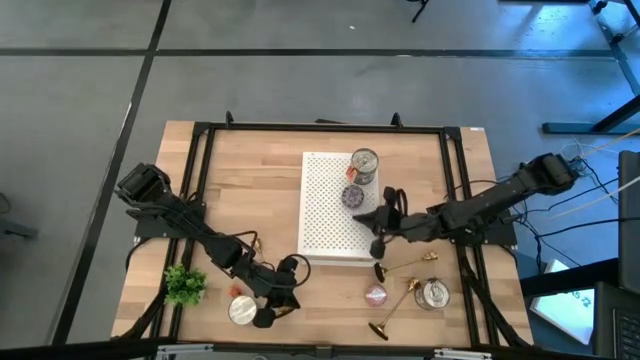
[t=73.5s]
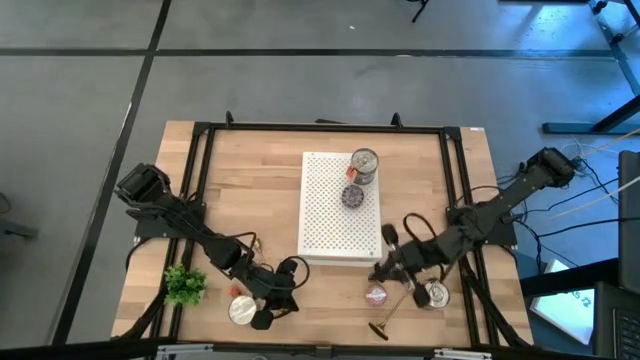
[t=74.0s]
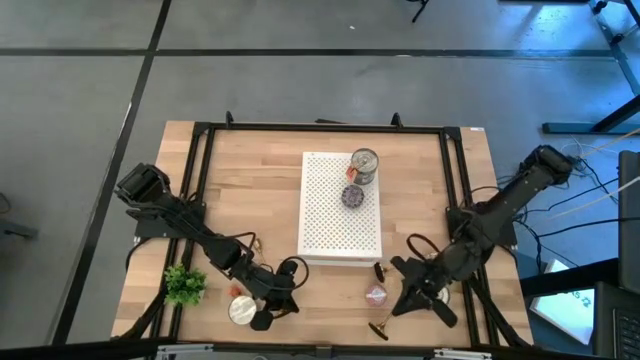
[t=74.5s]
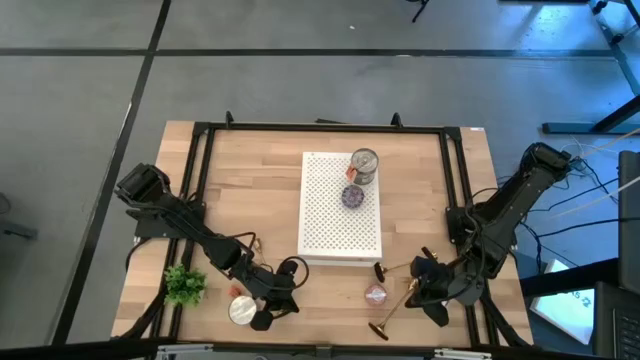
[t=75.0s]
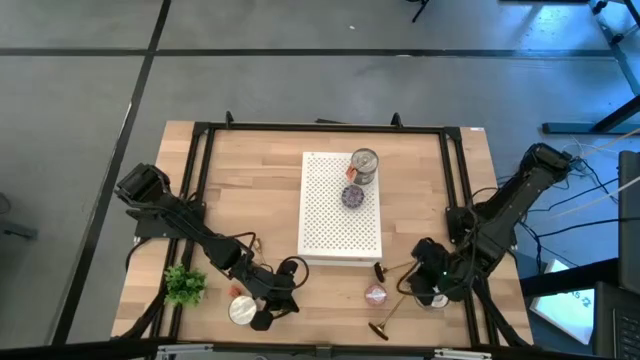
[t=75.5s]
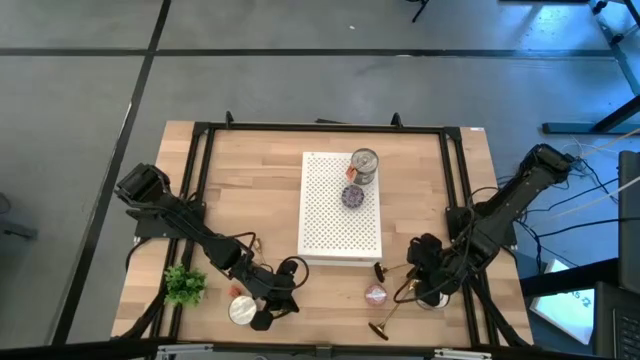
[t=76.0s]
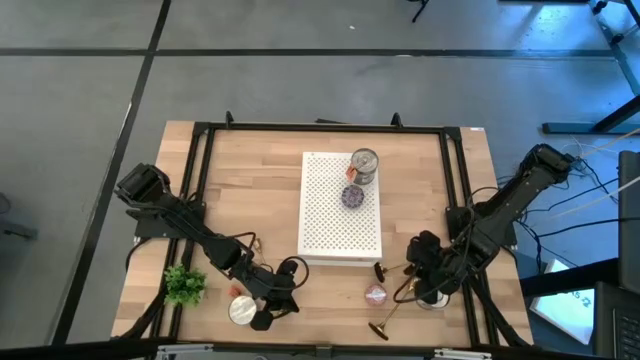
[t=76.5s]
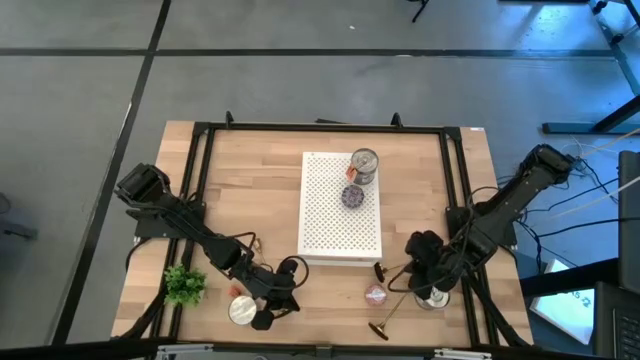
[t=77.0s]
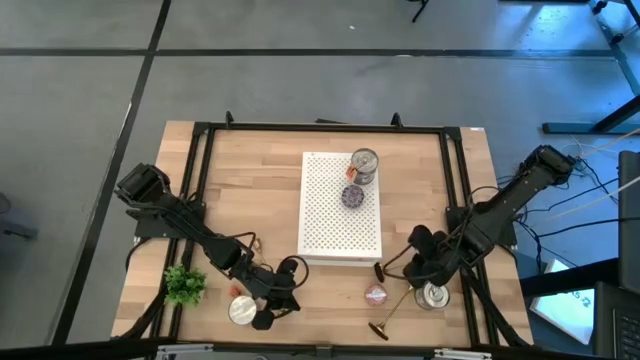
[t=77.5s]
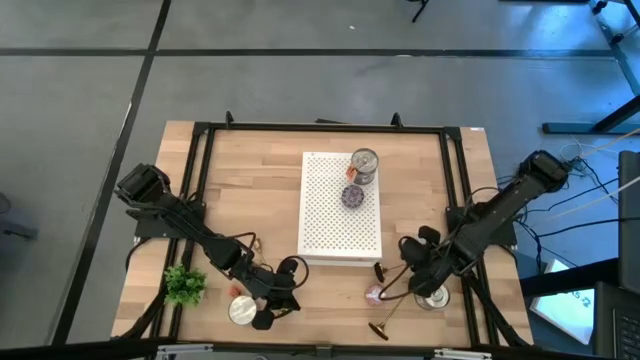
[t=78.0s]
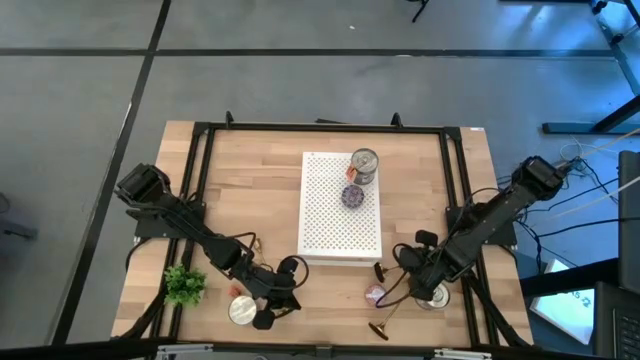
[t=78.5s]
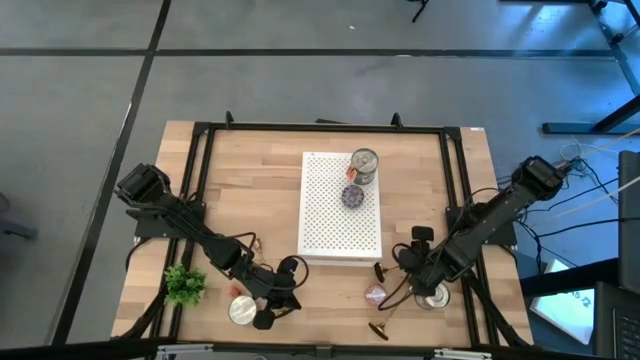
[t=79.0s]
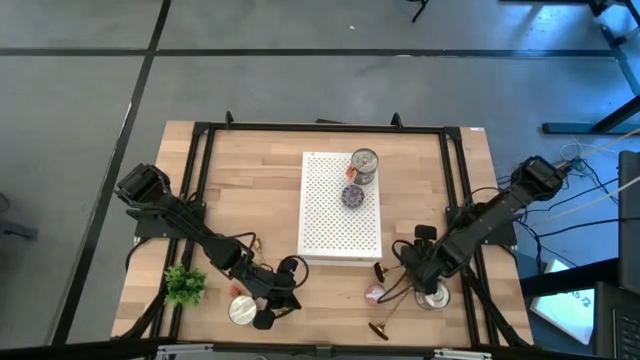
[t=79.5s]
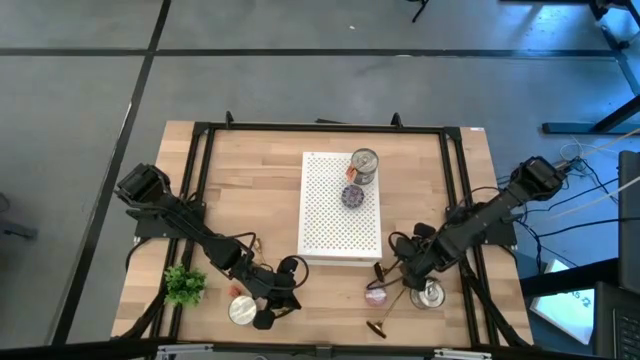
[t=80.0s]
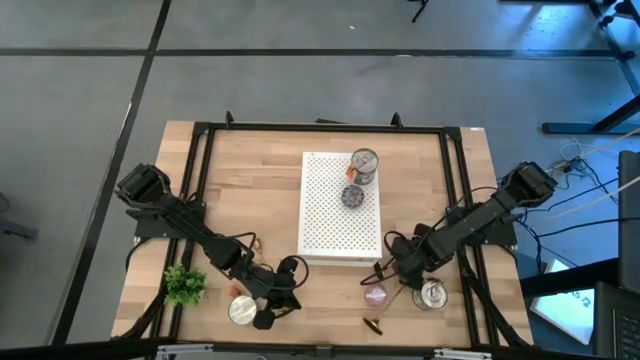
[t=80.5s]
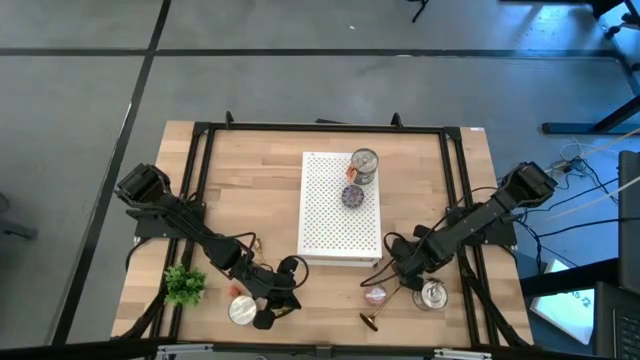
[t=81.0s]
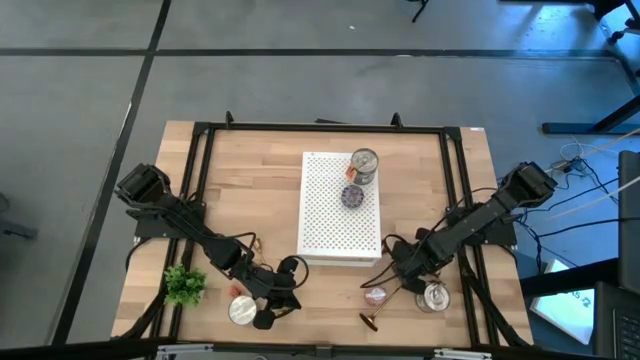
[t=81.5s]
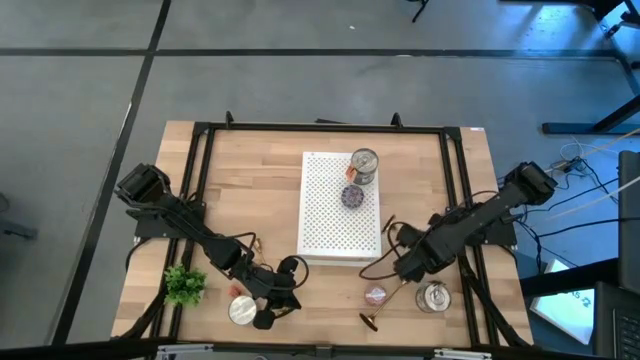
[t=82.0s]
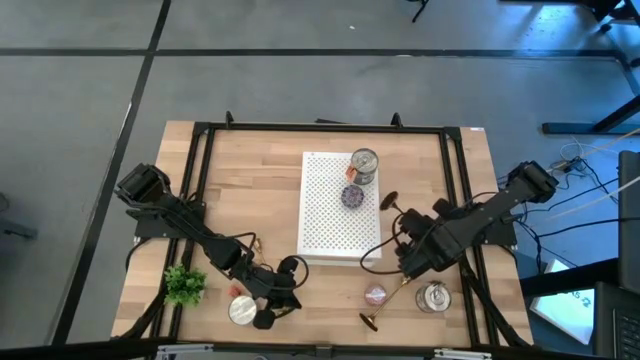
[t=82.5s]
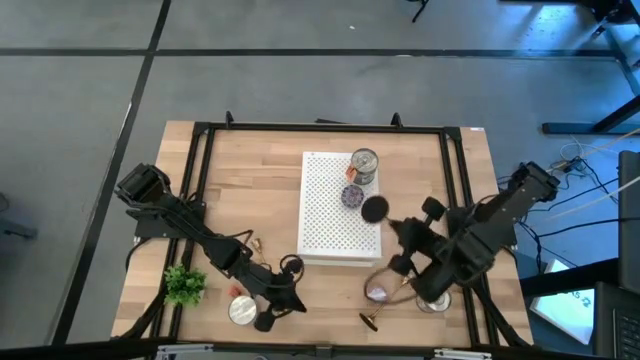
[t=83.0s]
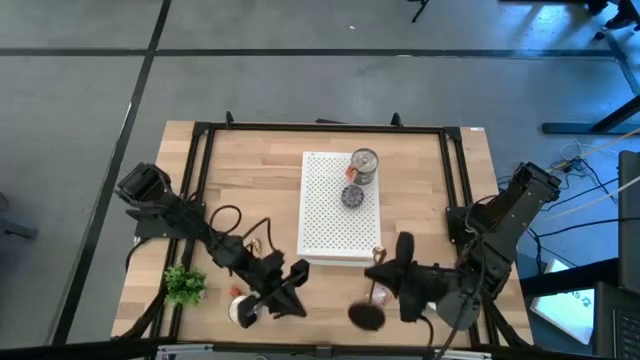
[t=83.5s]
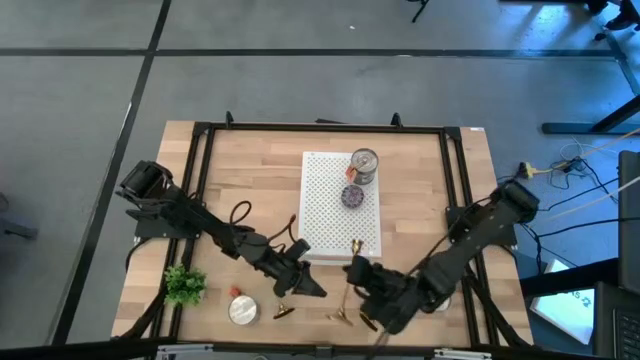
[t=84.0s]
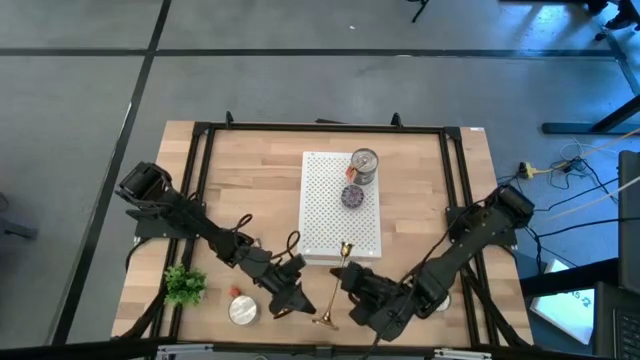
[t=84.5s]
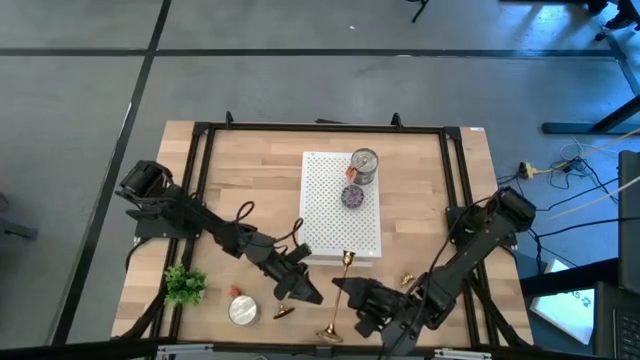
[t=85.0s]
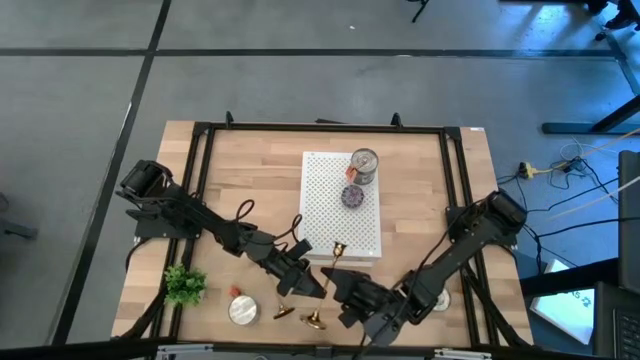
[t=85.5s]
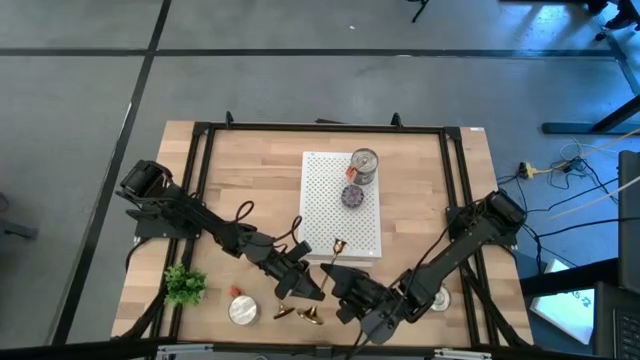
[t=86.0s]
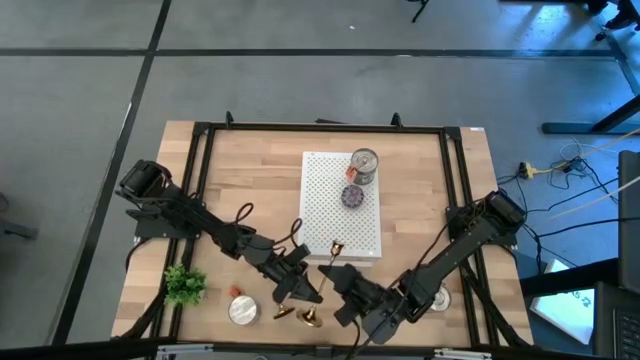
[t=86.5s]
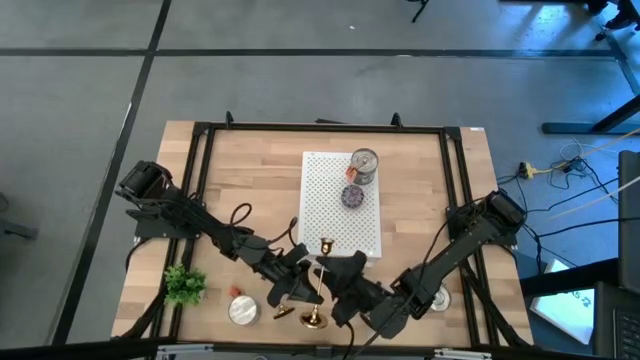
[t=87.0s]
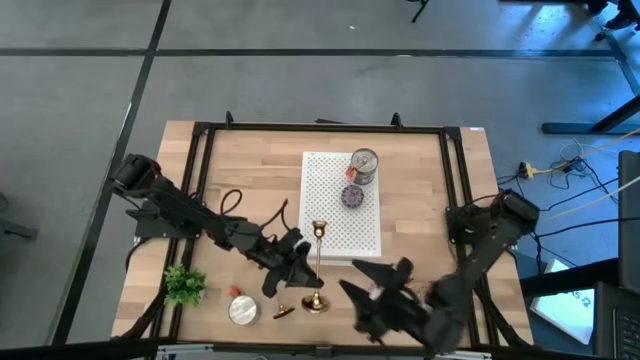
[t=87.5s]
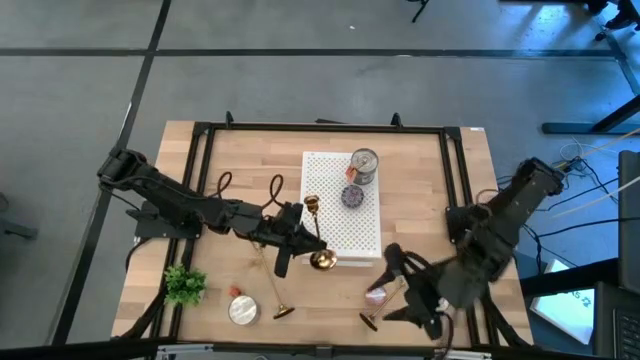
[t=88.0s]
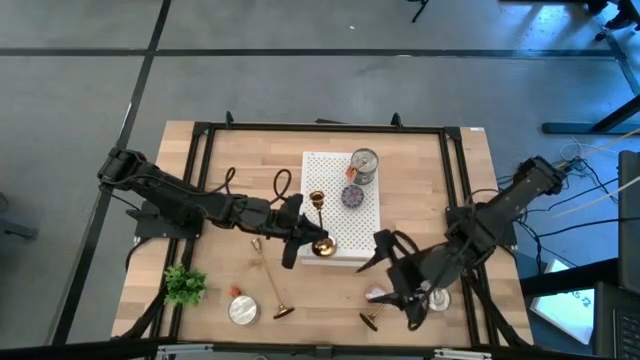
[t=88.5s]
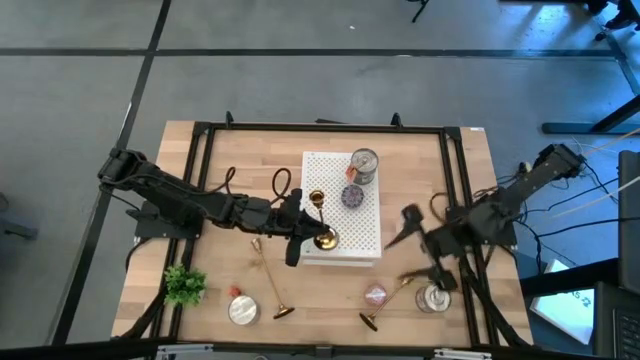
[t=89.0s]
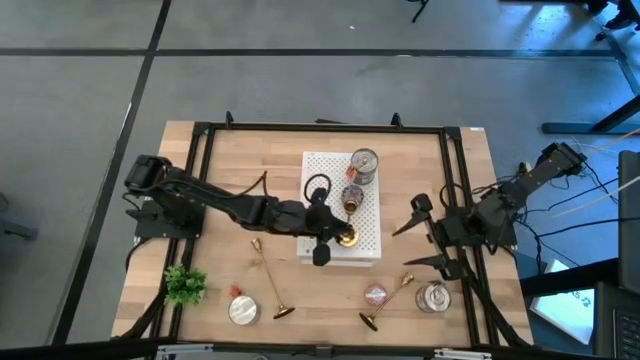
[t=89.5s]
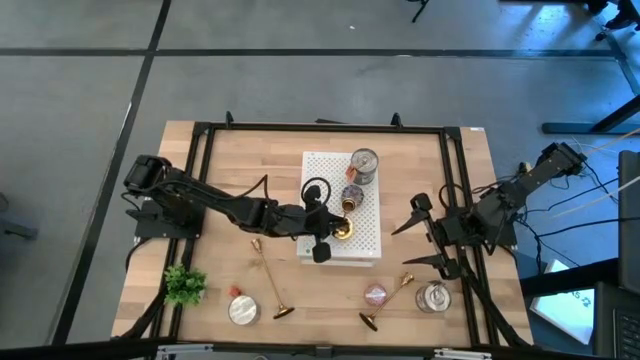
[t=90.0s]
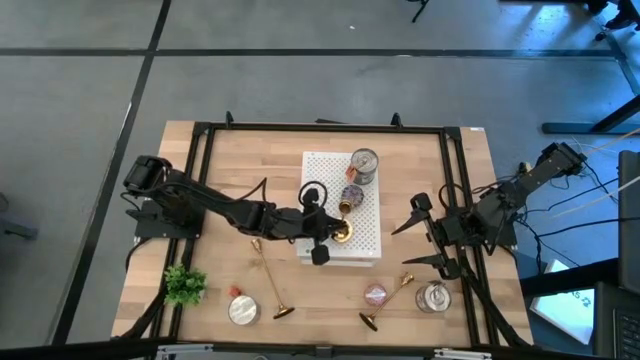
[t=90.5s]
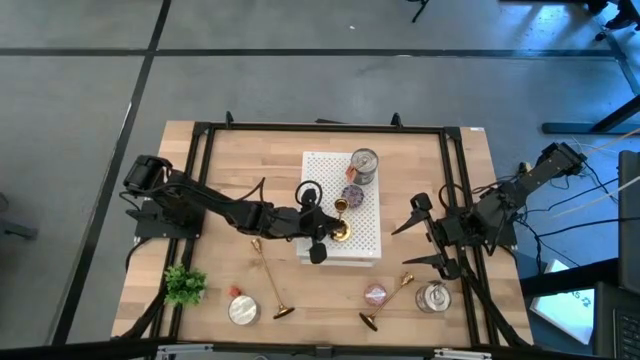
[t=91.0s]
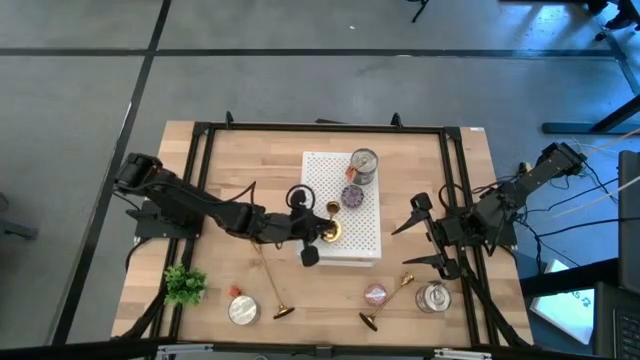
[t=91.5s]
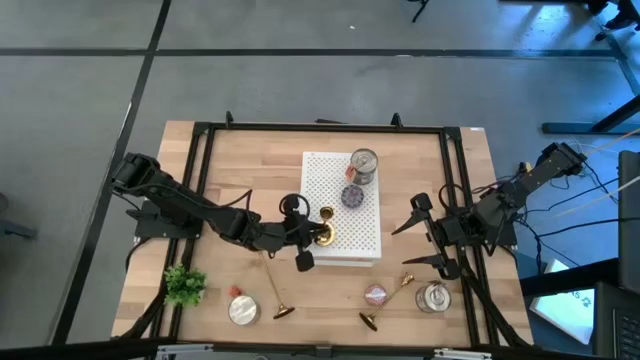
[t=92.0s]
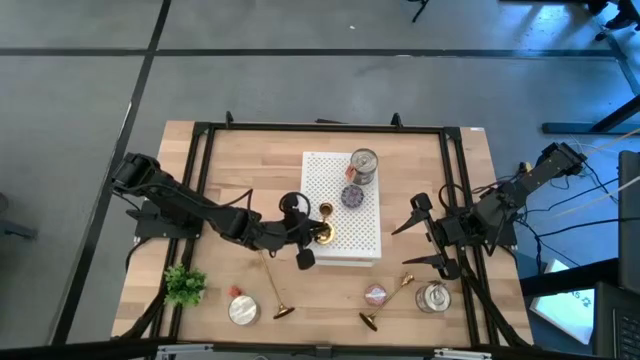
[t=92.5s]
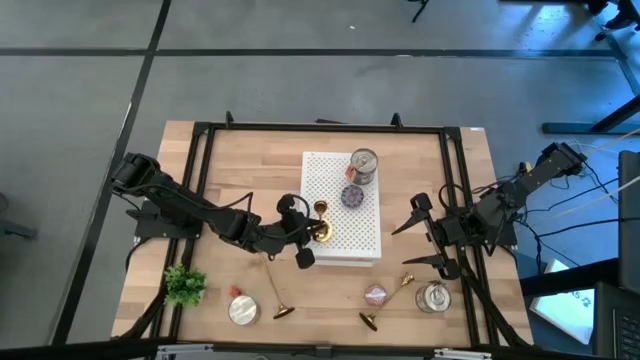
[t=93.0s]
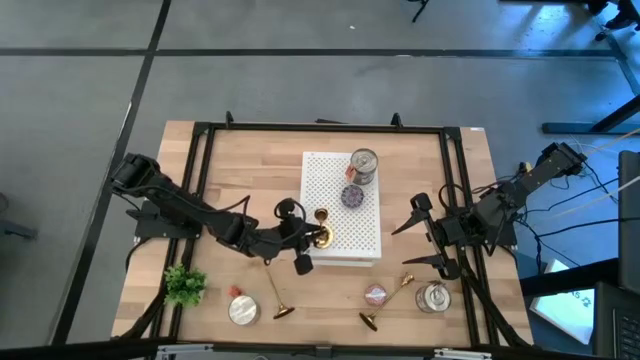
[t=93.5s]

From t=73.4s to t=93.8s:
Task: Pick & Place candle stick holders
Put the top gold candle holder on the shelf
